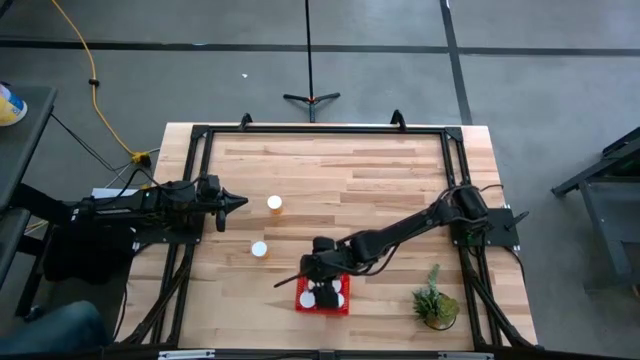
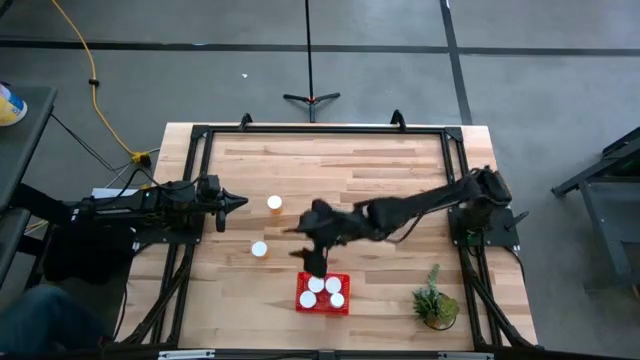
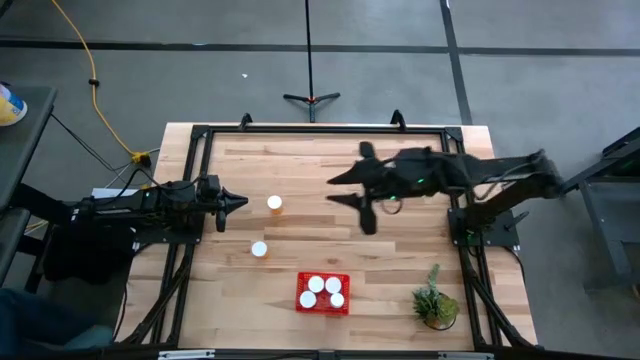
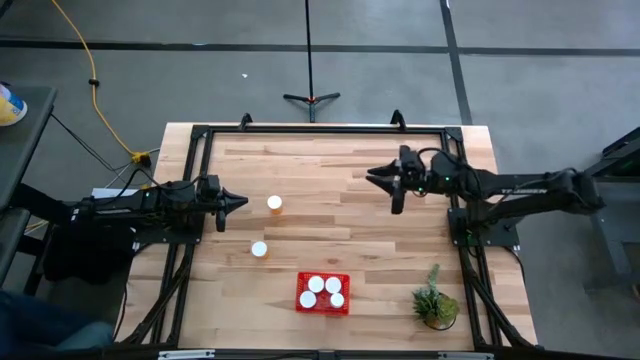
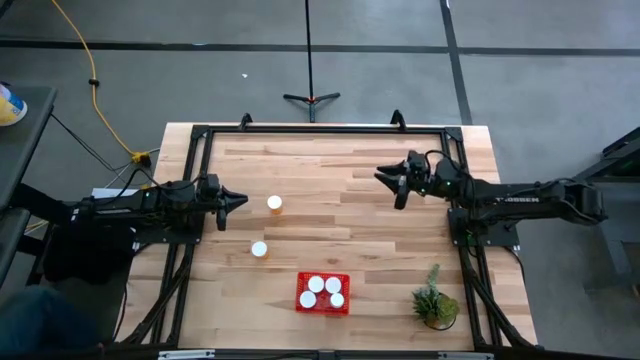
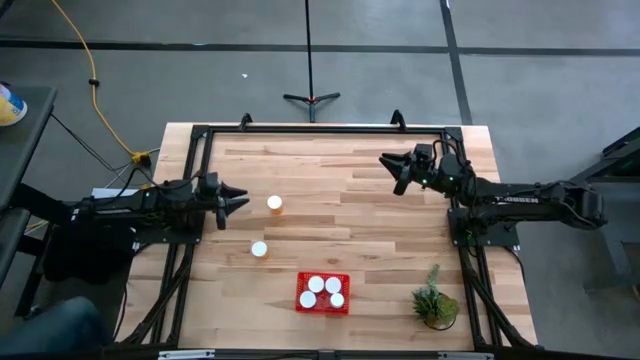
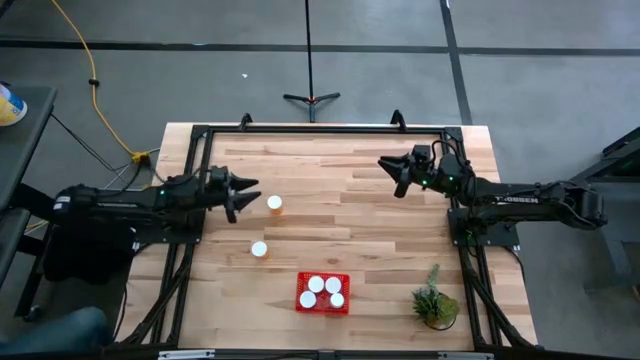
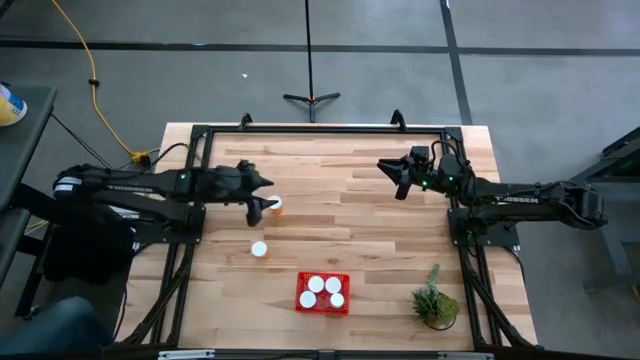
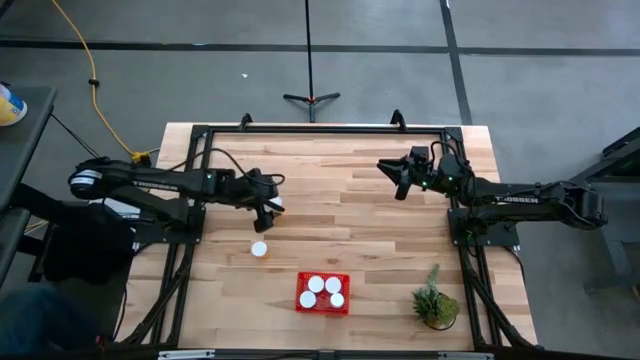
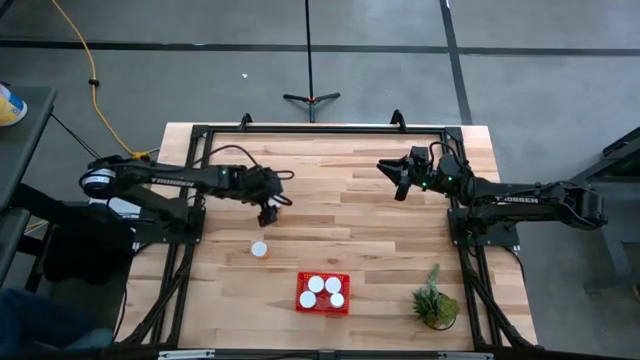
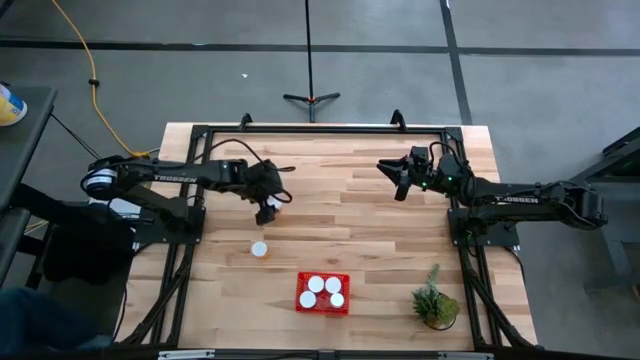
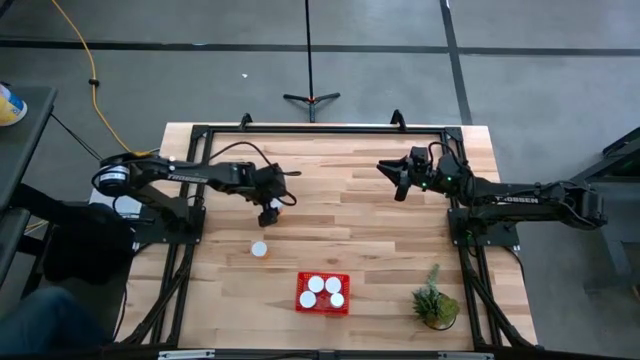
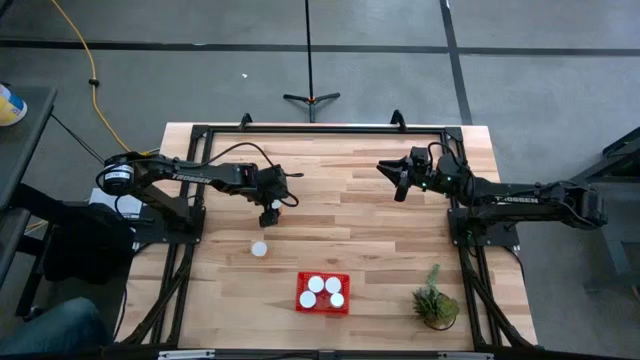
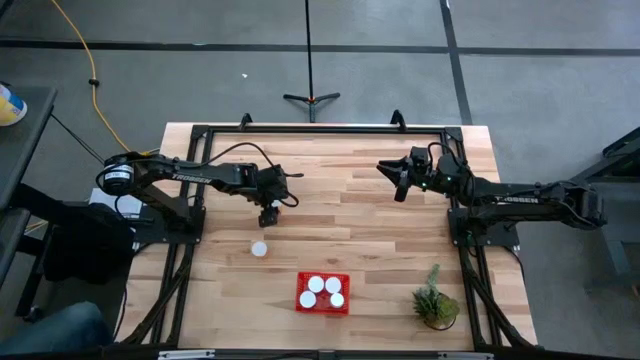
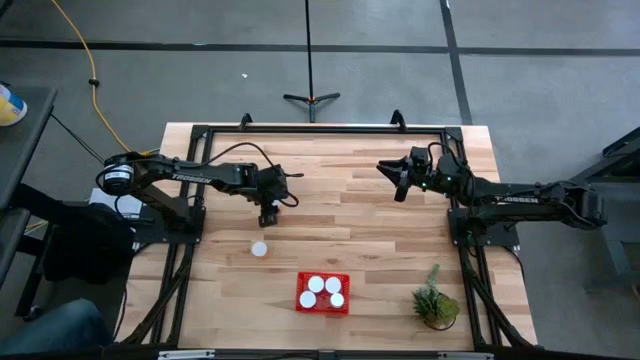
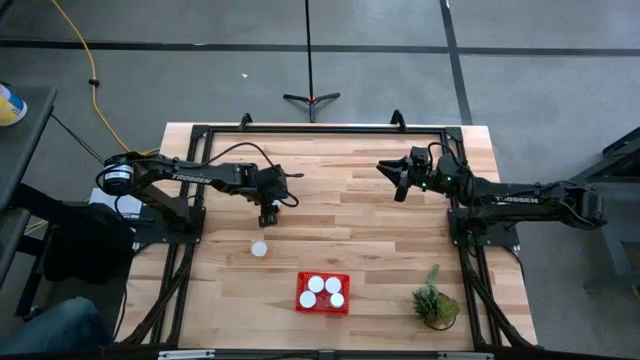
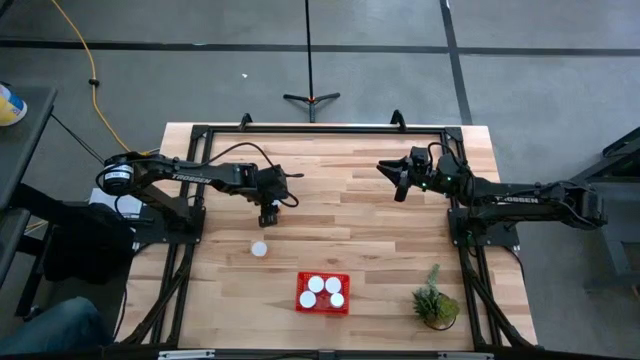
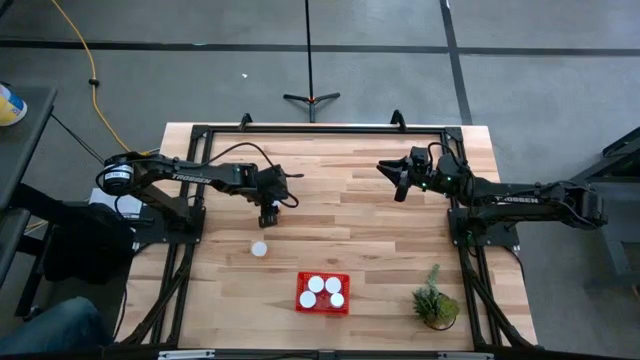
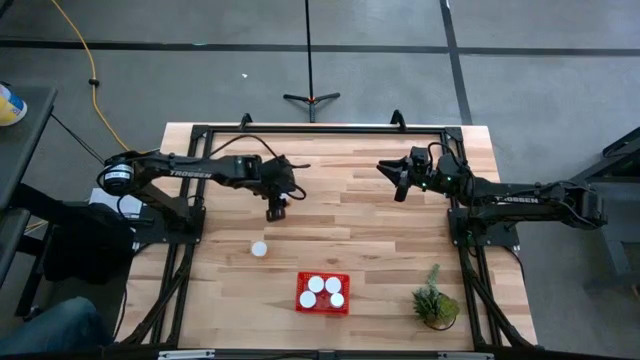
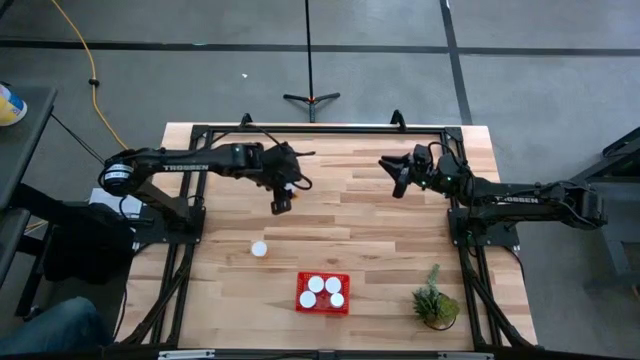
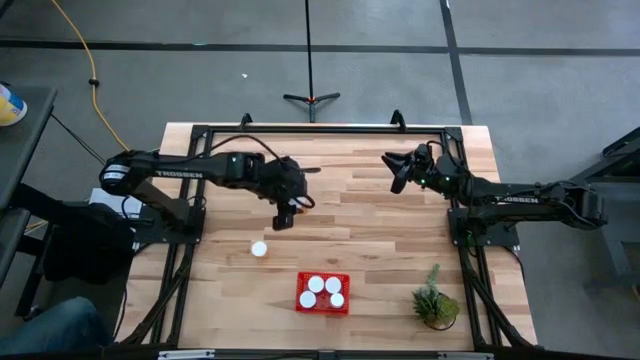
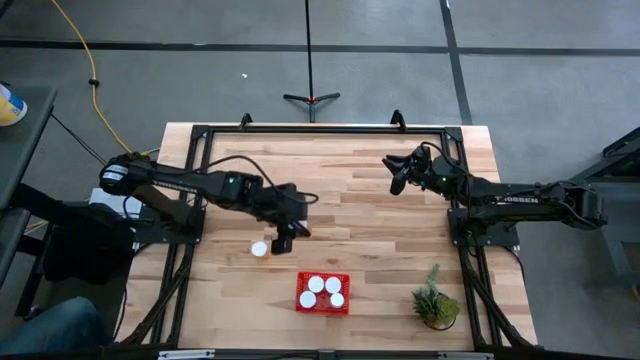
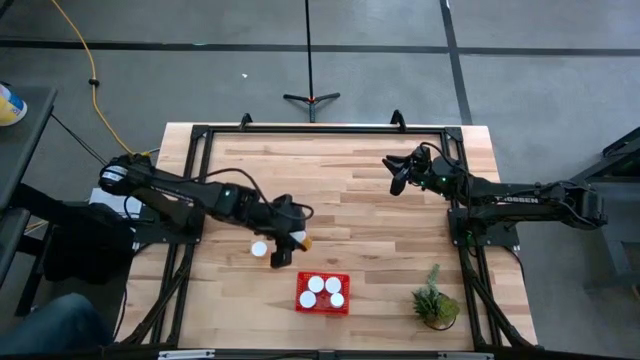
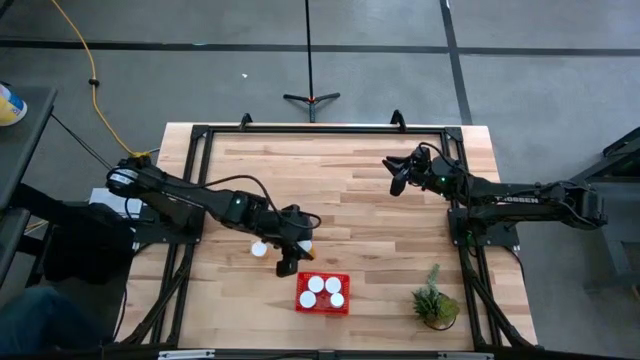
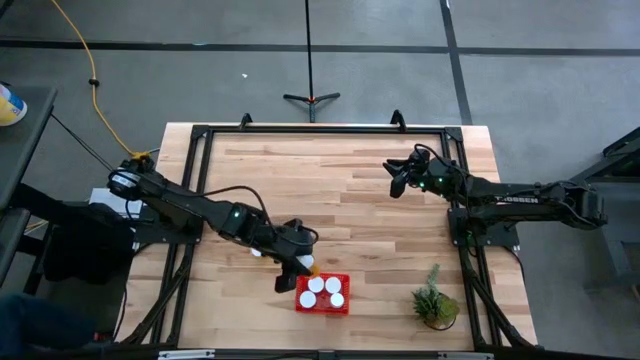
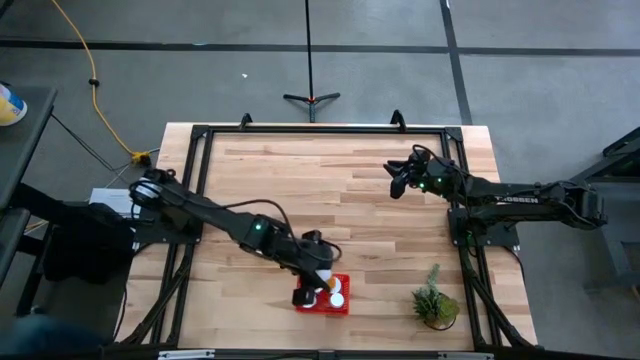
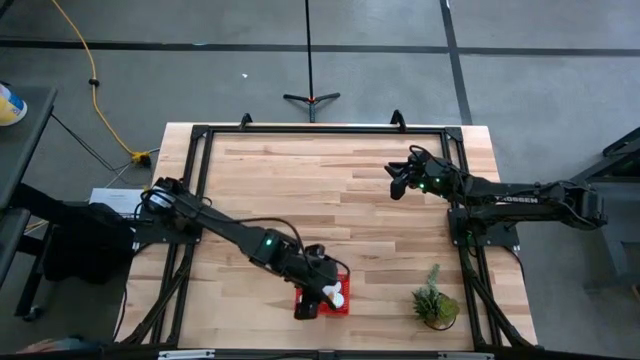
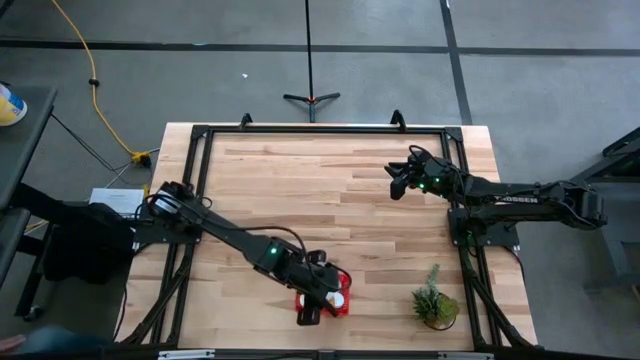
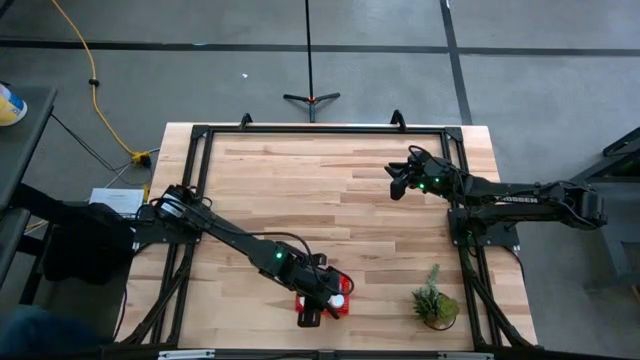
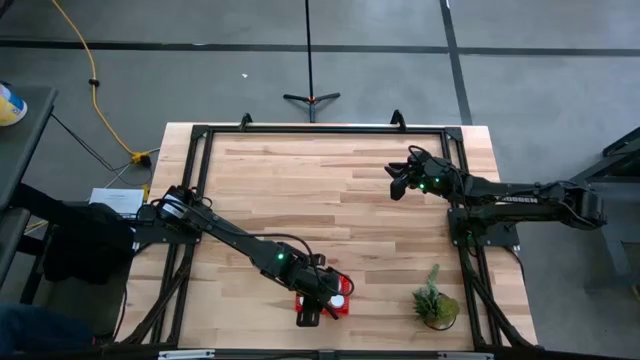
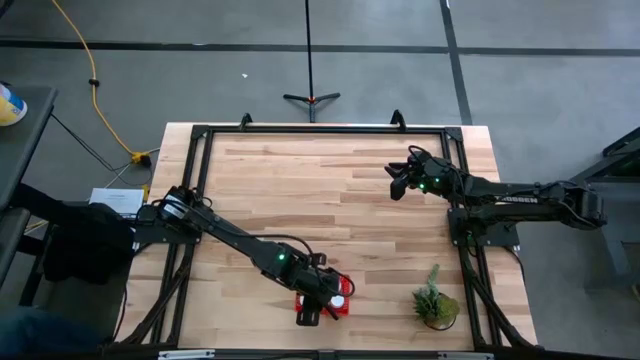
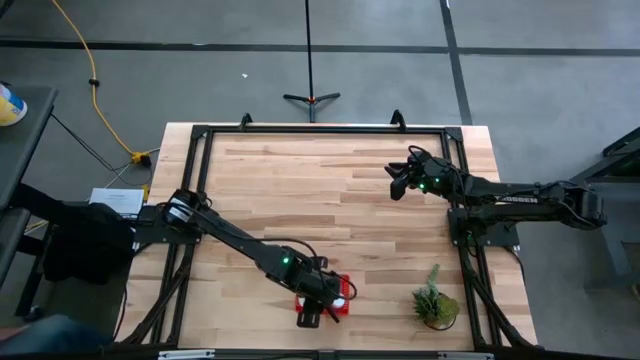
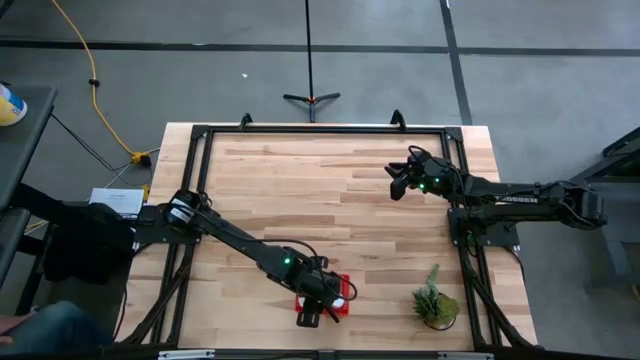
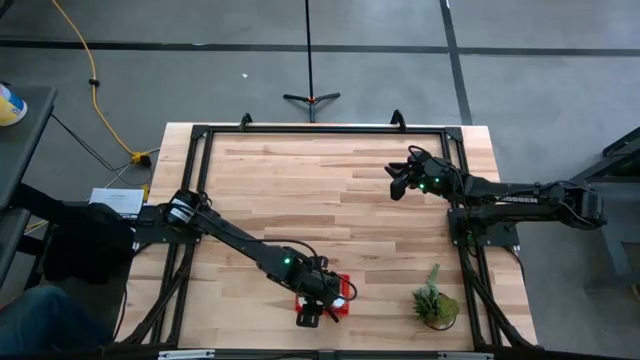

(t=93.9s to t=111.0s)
Task: Pick and place pill bottles into a basket
Put the orange pill bottle into the red basket

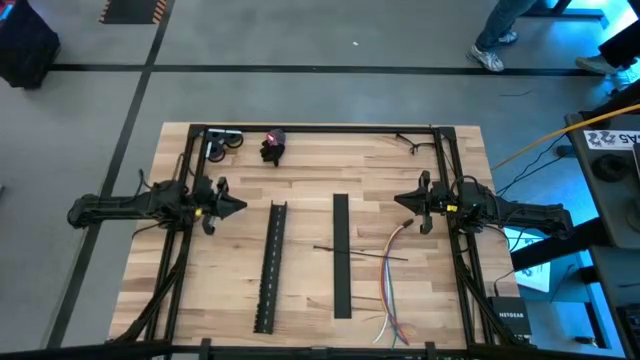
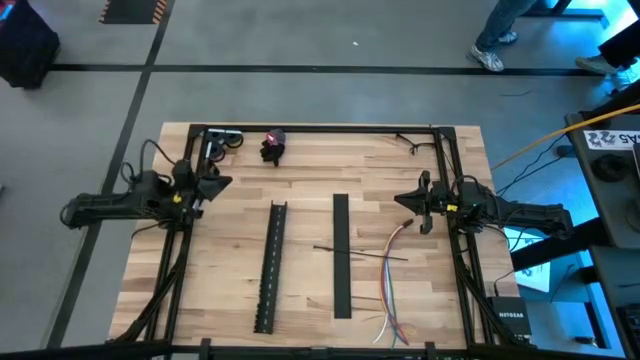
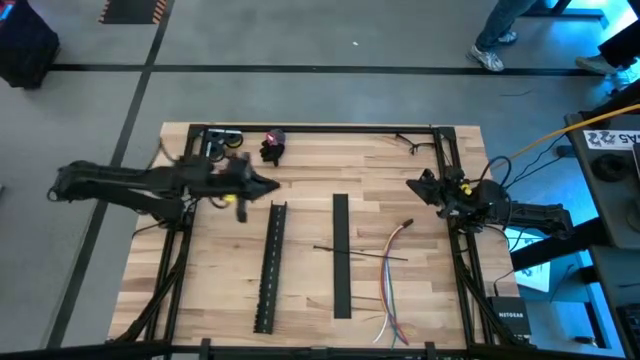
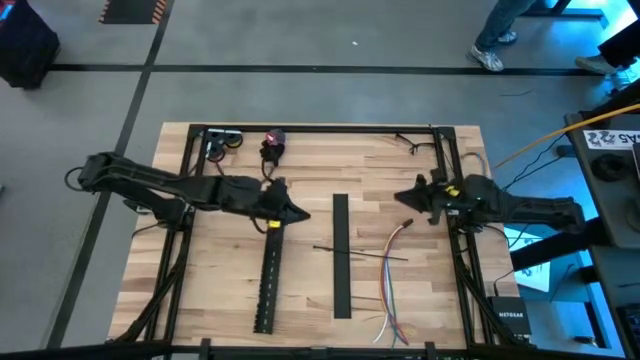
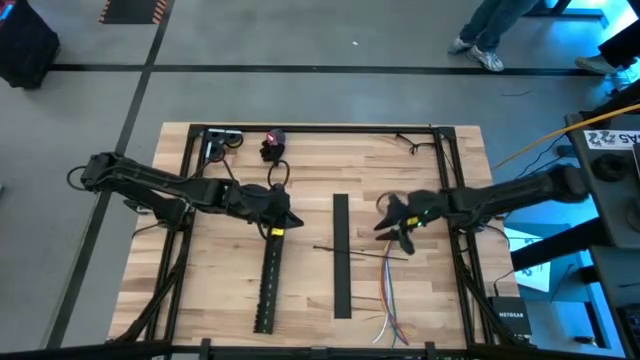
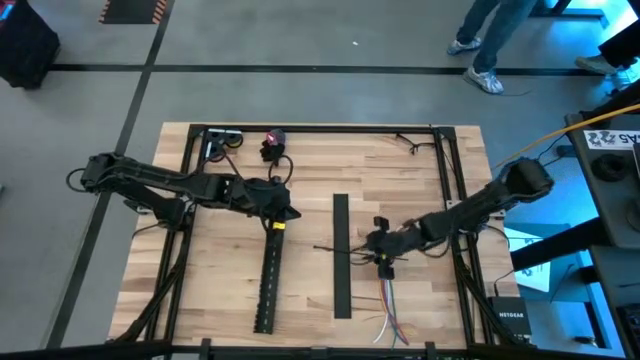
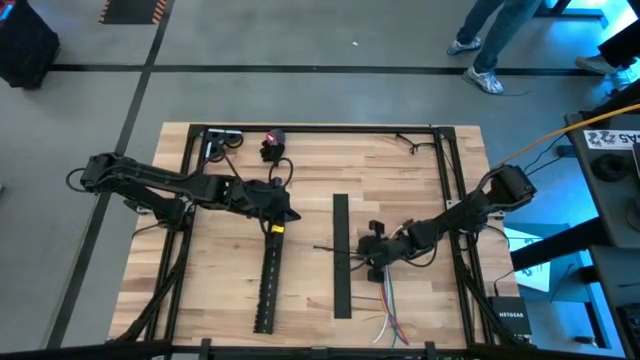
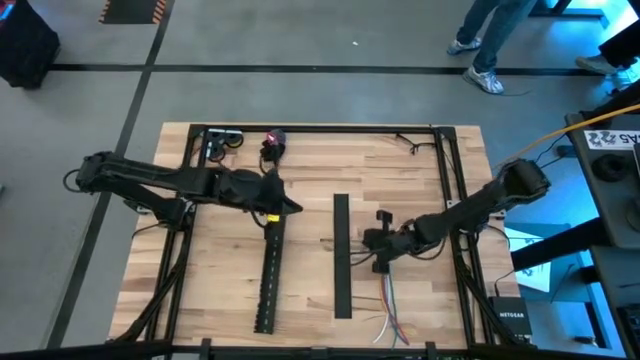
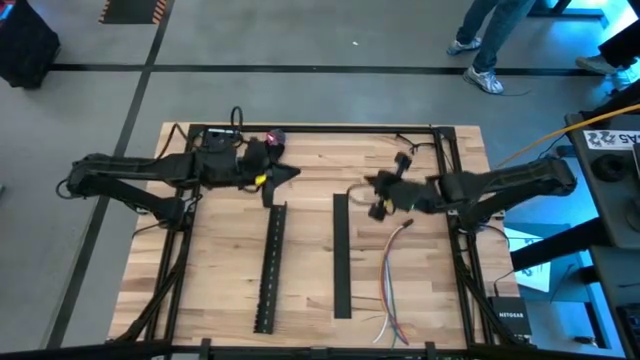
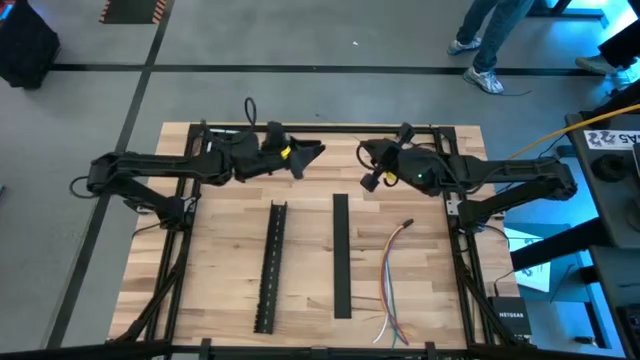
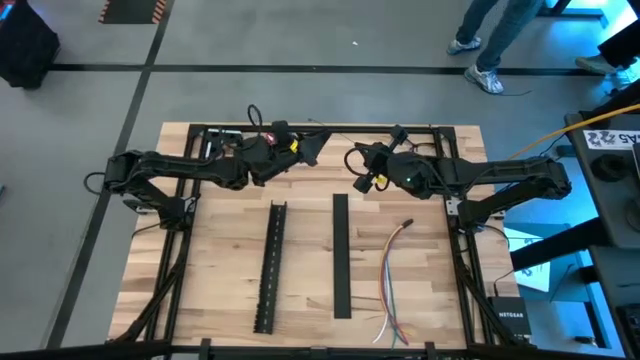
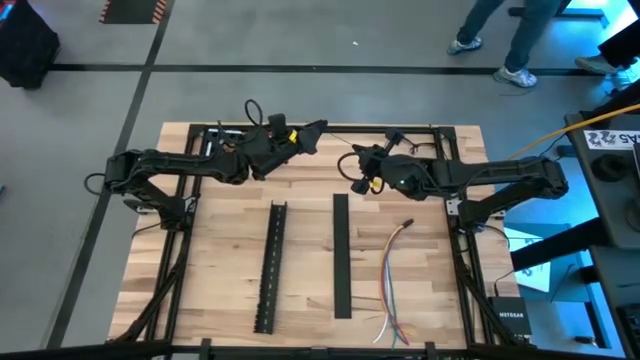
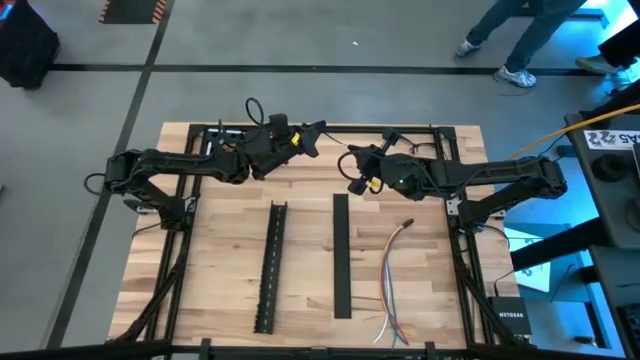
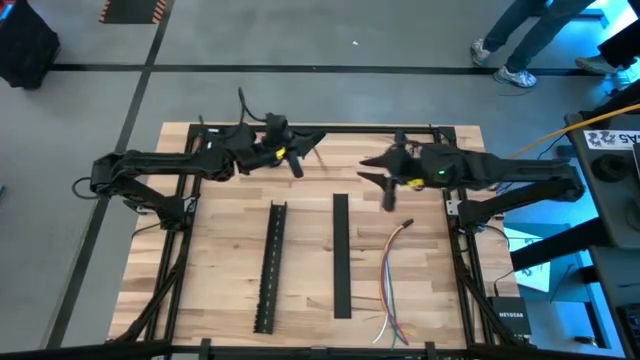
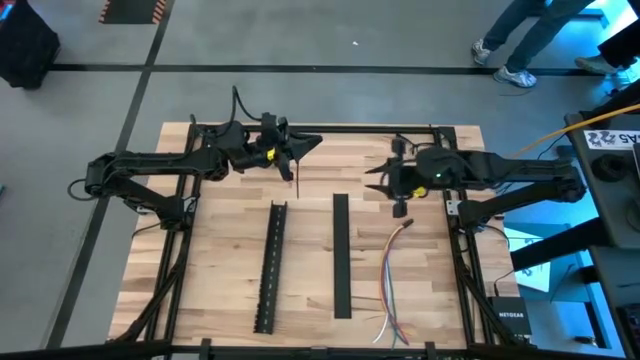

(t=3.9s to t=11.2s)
Task: Ziptie cables
Insert the black zip tie
